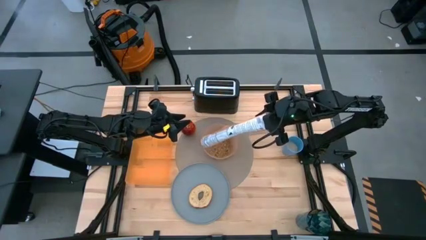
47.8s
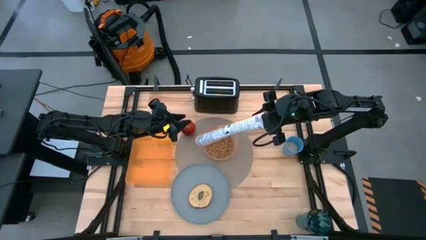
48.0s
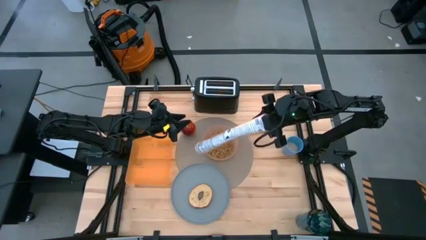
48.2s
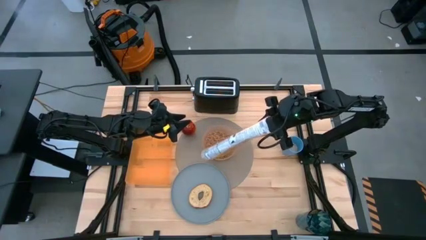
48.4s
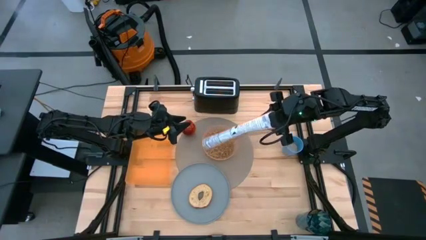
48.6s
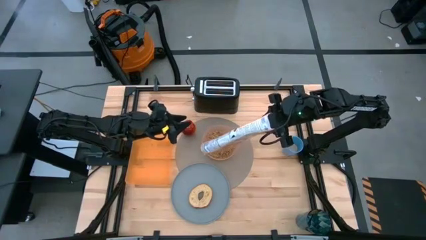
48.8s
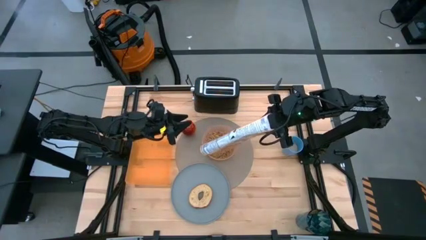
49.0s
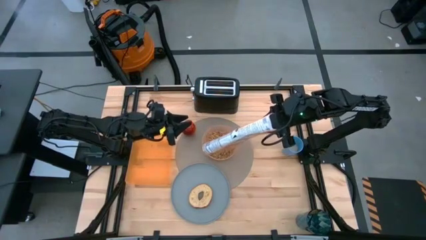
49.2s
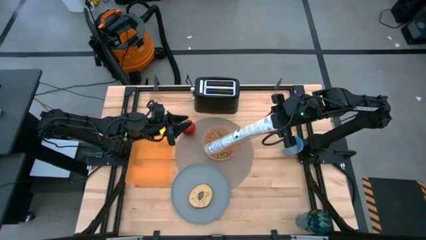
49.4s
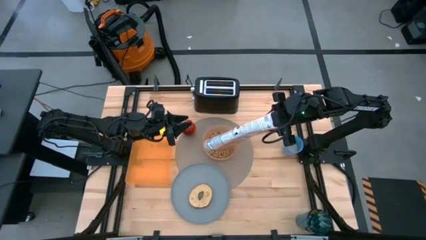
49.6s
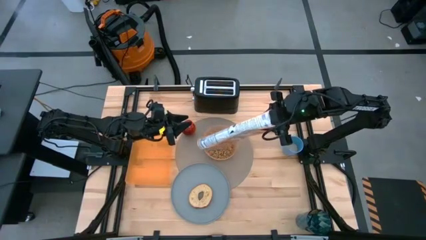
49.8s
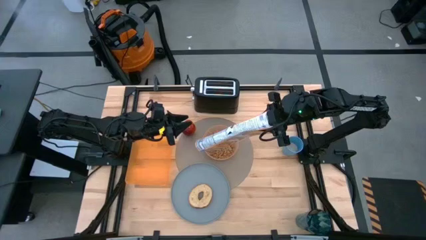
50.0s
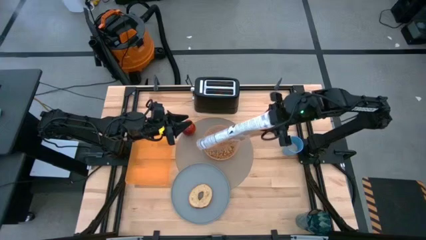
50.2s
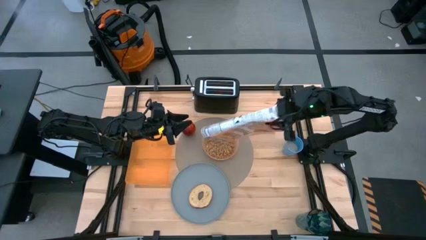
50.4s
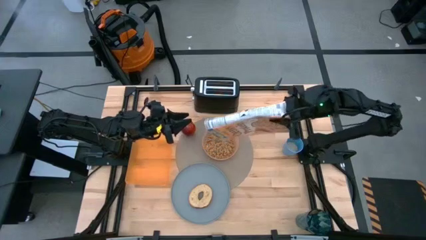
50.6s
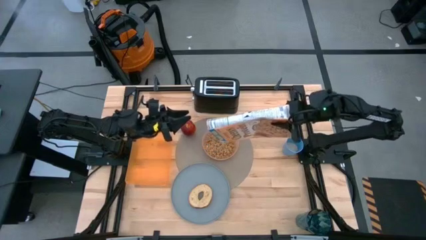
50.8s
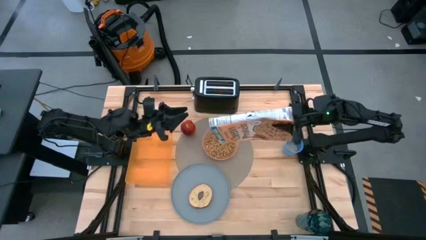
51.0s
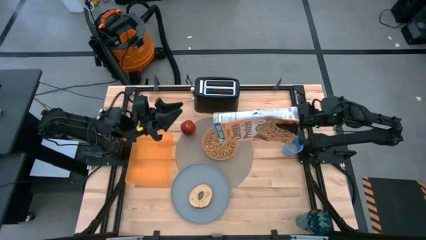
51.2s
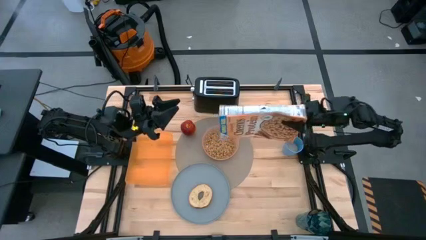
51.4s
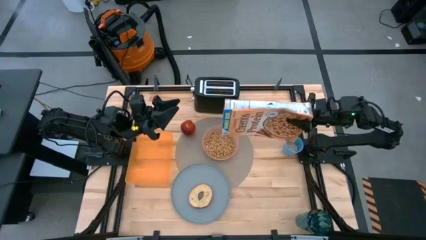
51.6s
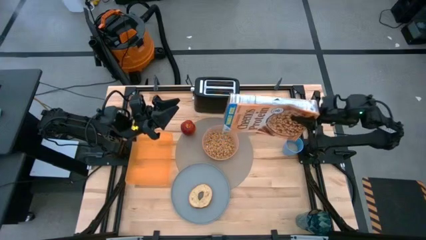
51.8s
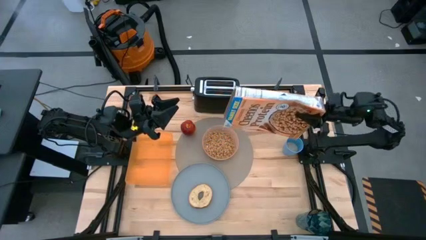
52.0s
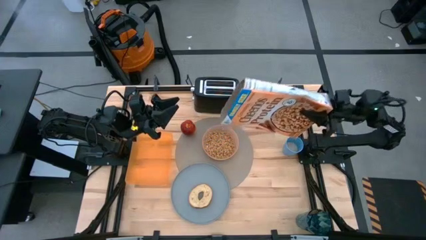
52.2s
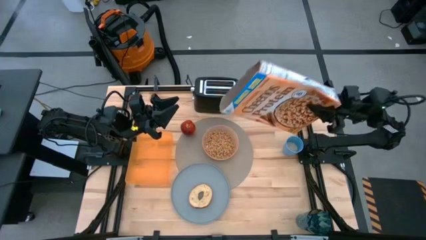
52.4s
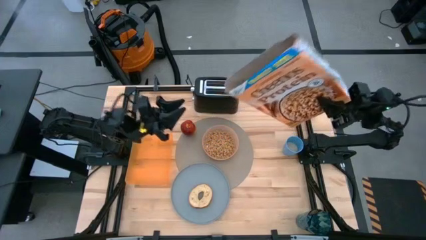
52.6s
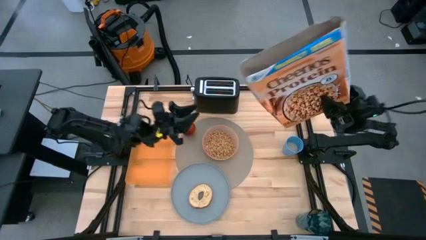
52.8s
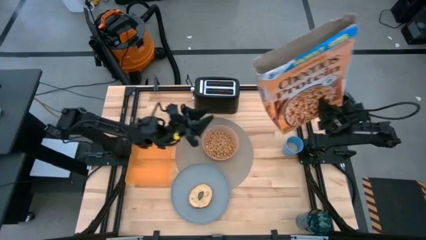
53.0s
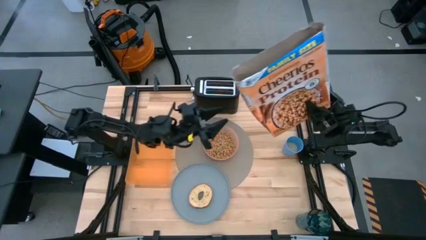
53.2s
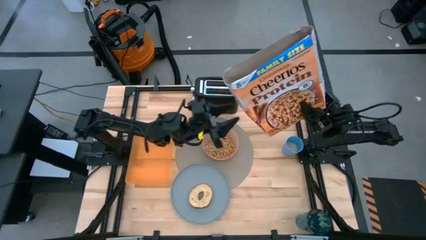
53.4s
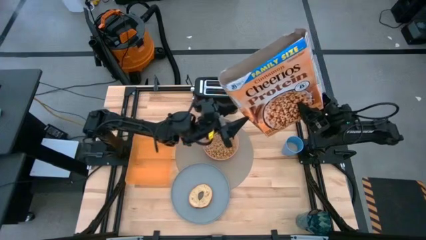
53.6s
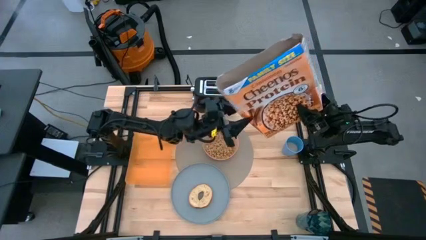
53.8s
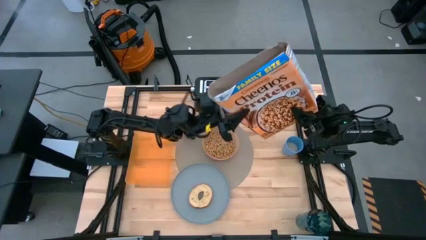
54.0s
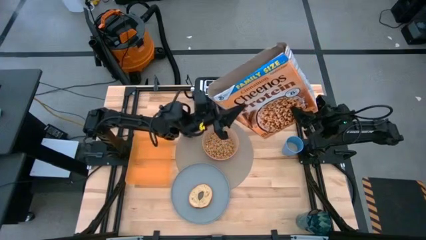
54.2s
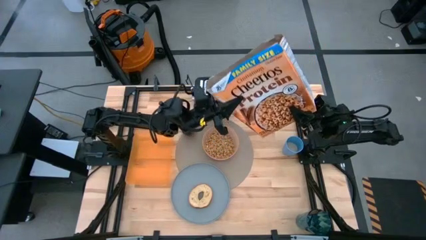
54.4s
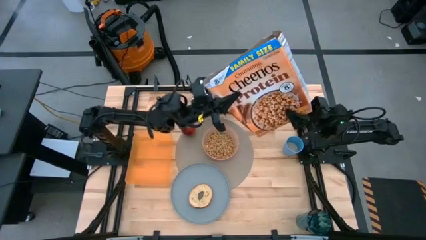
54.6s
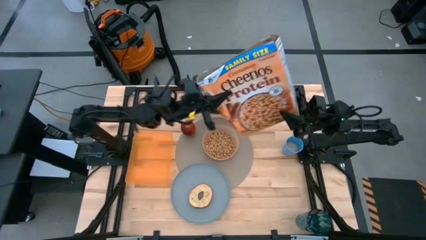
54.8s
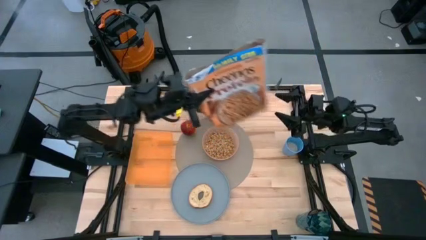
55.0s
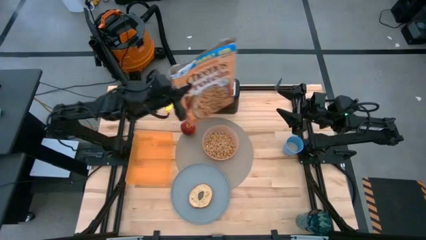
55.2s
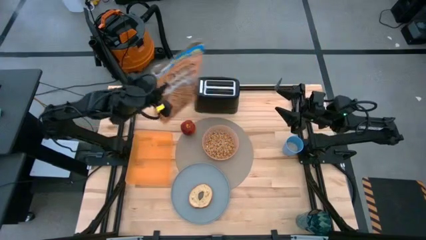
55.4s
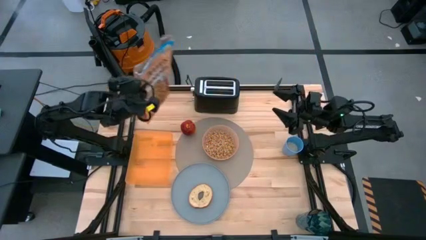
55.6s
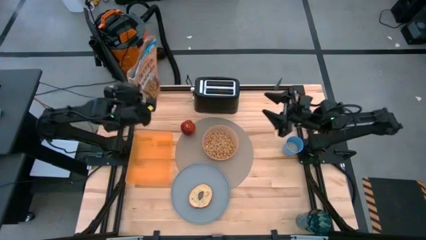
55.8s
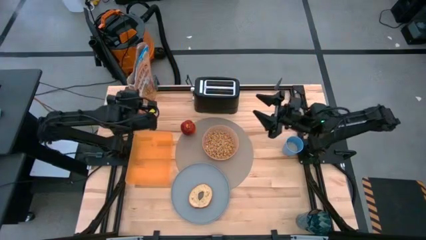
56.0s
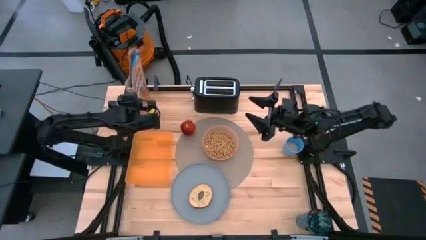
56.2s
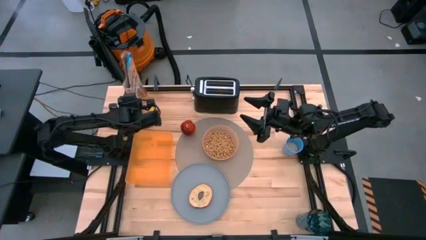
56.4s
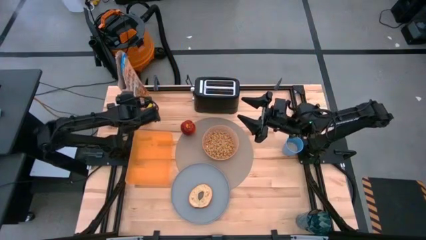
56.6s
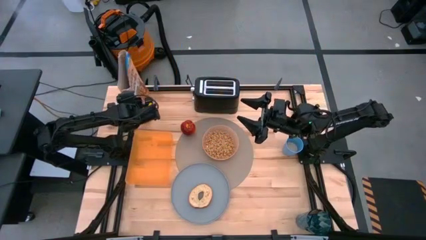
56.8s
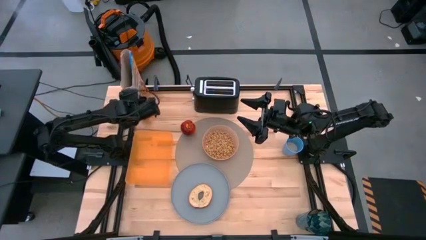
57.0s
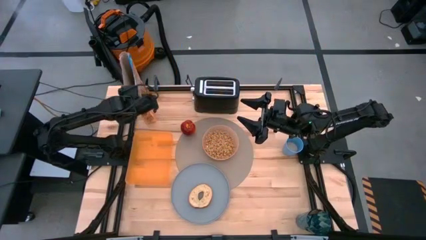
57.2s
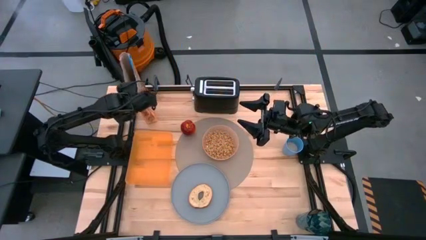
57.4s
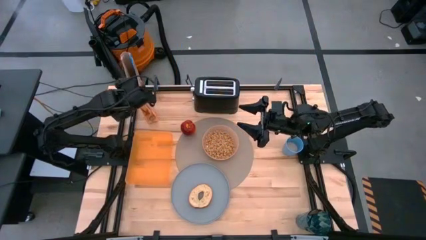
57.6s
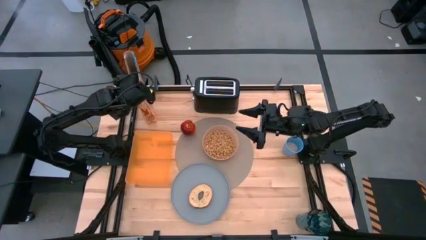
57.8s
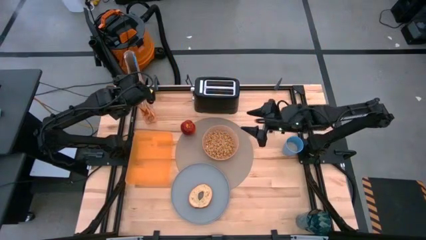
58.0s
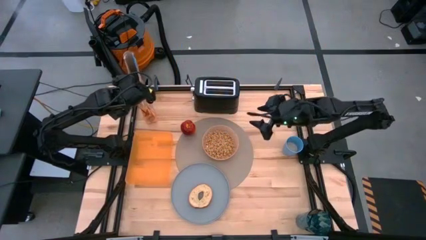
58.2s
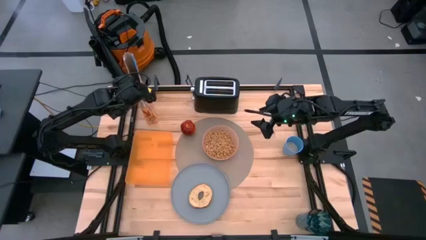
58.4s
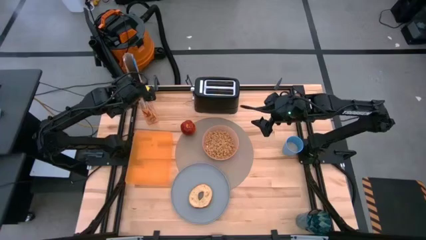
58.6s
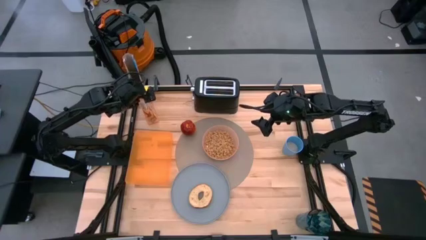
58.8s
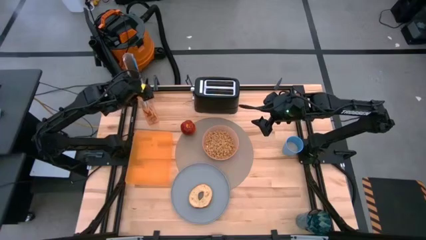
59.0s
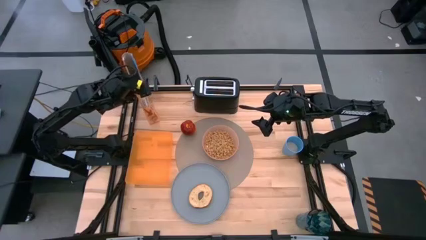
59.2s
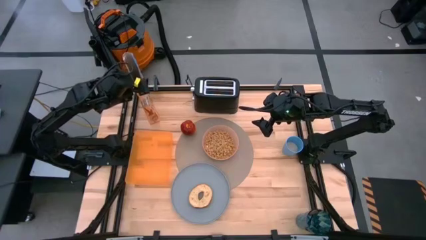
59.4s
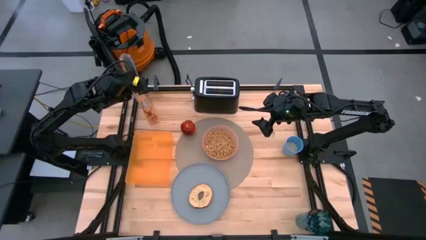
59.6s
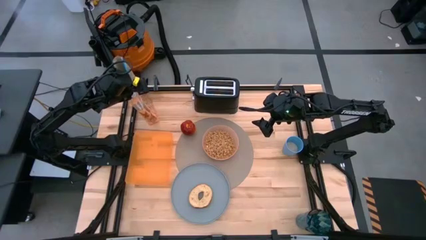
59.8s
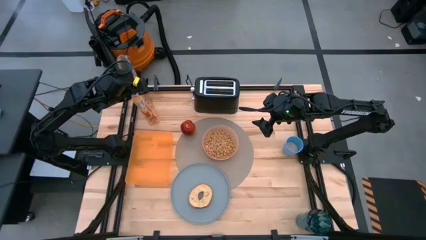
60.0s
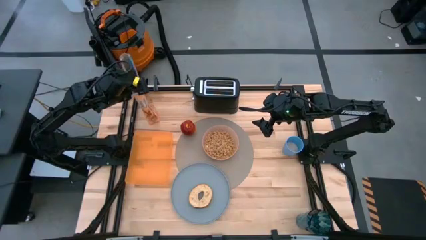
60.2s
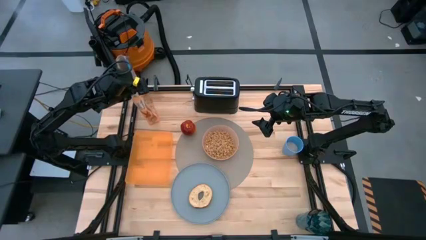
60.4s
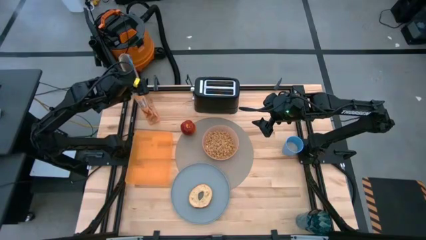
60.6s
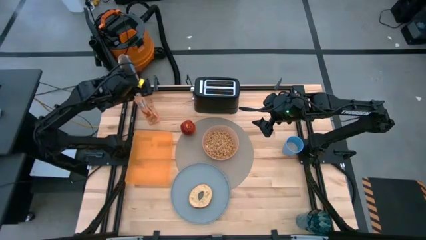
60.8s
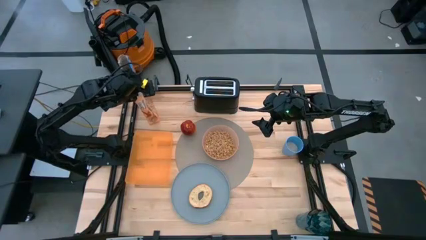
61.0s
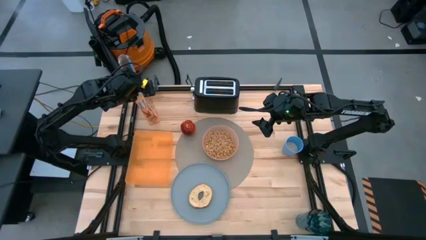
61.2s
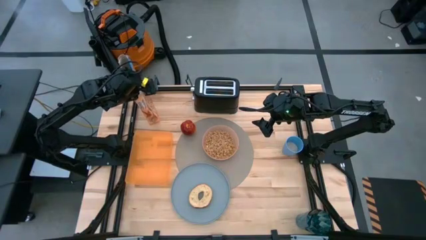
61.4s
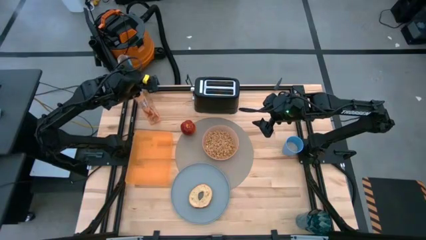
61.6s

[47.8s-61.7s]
Task: Arrange a breakfast setting
Pour the cereal into the peach bowl

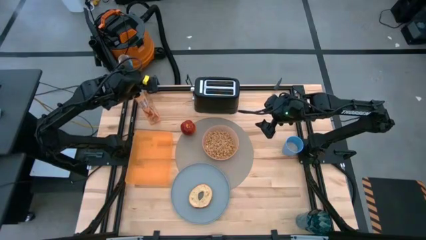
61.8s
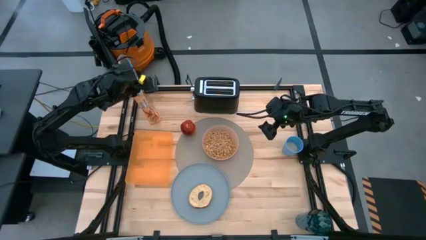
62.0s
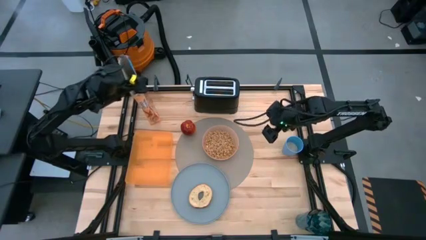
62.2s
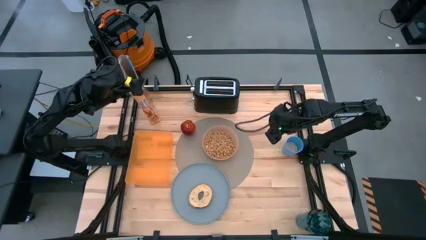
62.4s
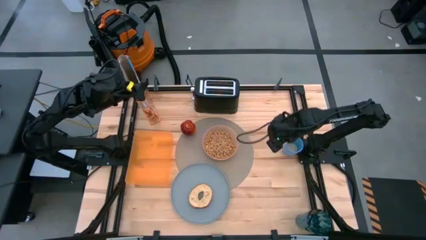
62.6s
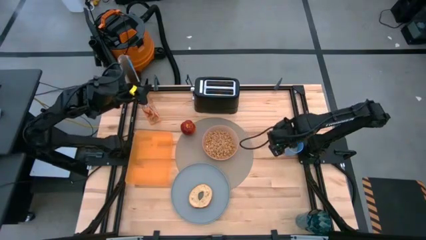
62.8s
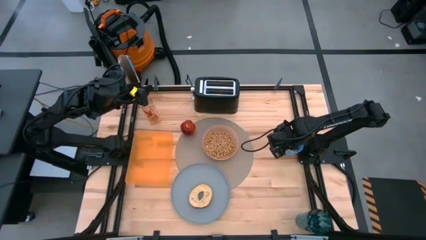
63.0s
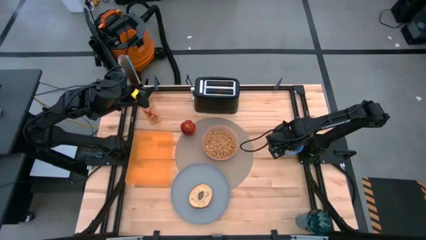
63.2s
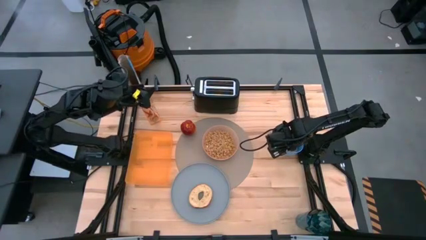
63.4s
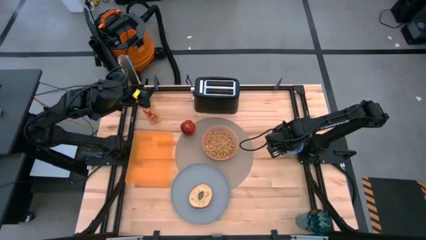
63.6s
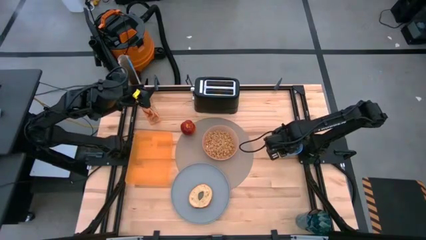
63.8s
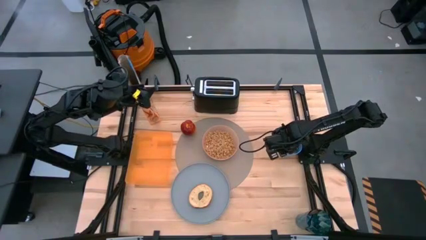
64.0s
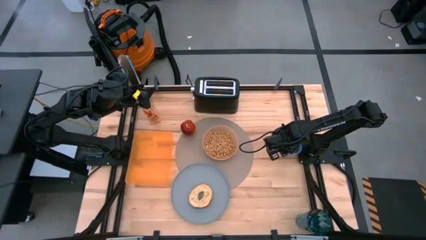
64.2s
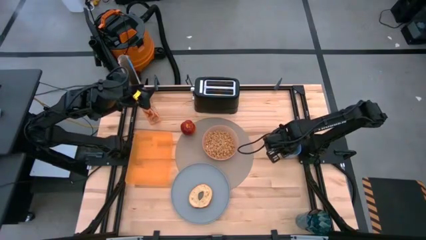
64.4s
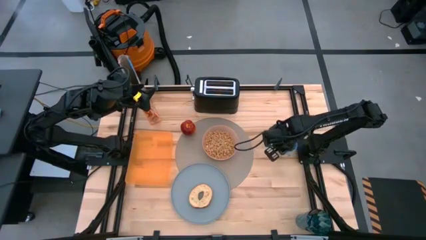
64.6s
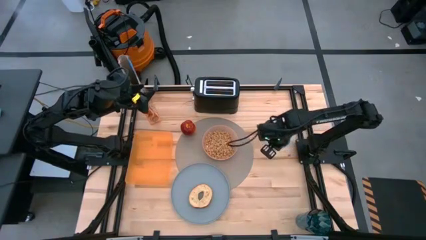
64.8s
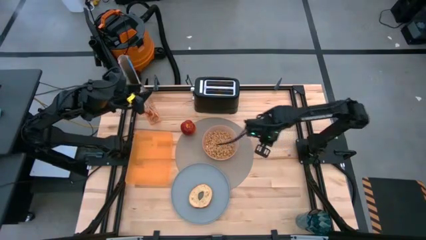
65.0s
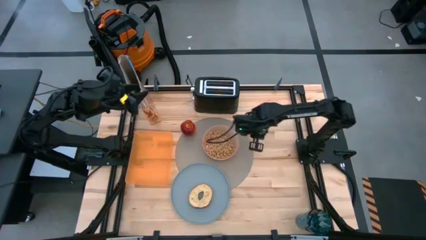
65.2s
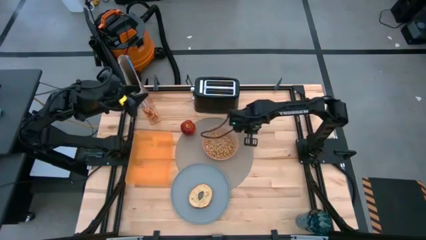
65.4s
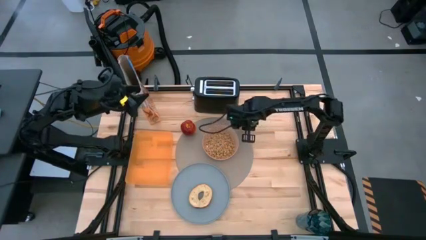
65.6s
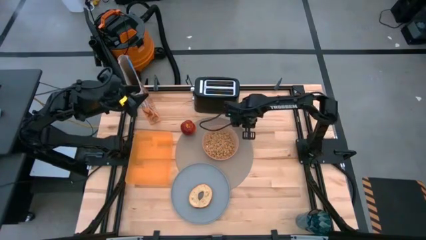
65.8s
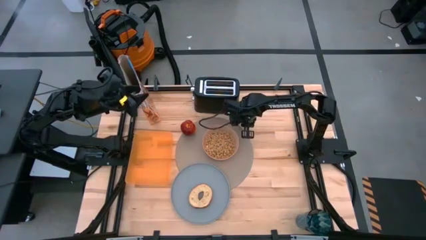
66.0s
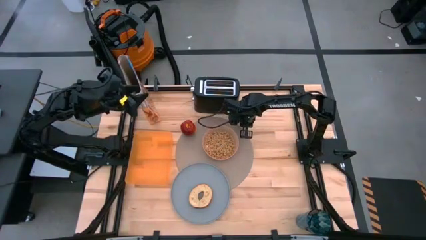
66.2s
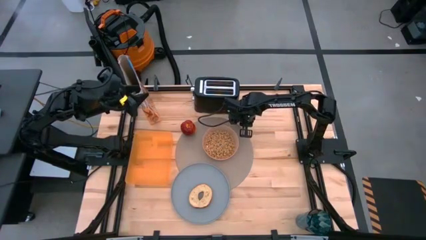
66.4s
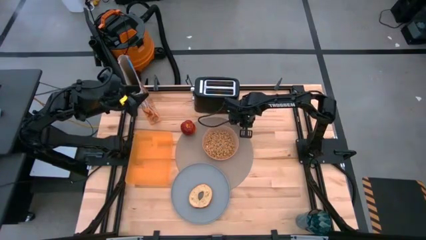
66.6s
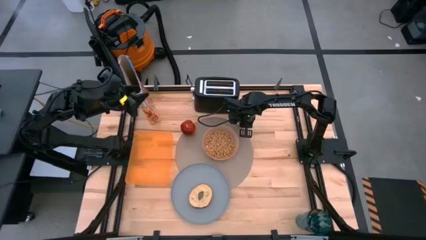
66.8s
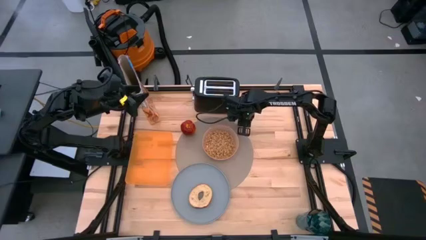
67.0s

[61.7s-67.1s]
Put the blue cup into the top right of the table
